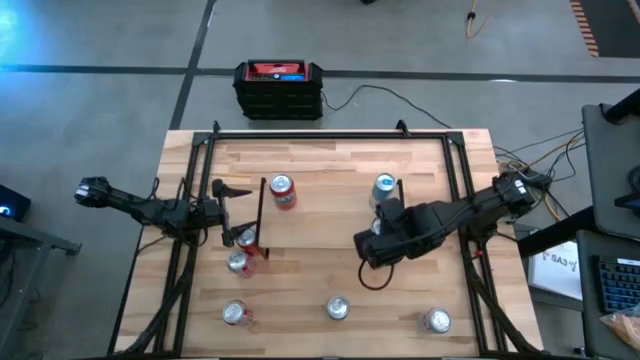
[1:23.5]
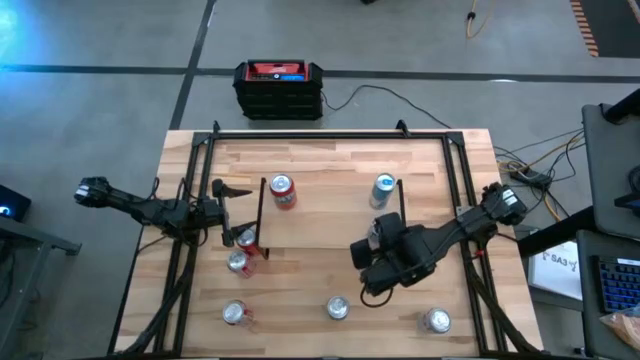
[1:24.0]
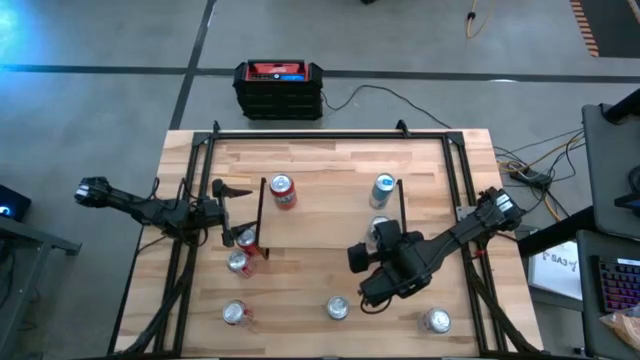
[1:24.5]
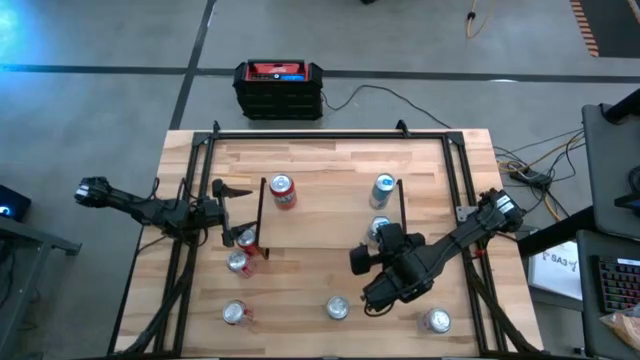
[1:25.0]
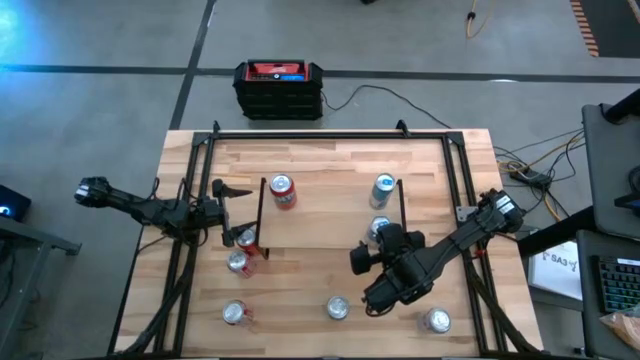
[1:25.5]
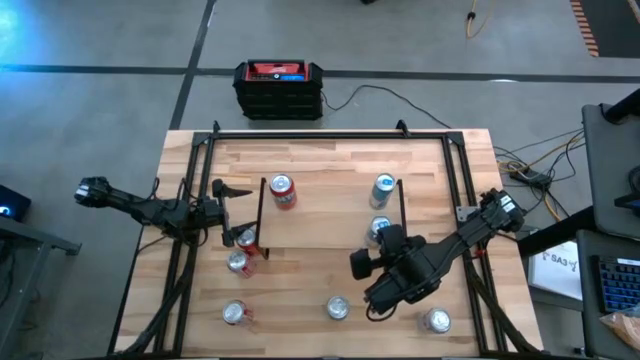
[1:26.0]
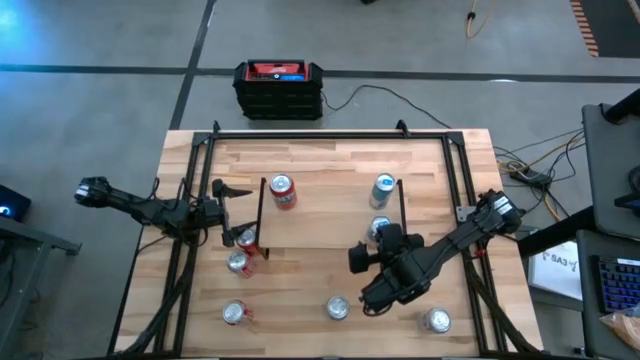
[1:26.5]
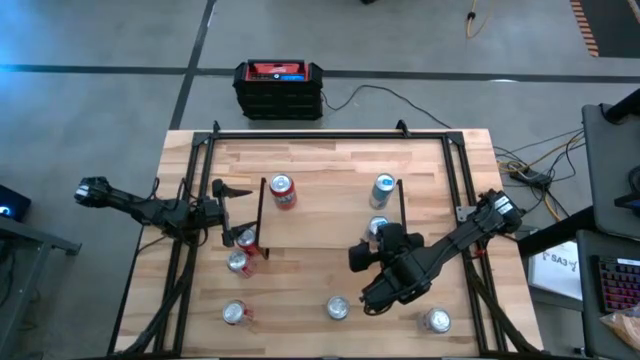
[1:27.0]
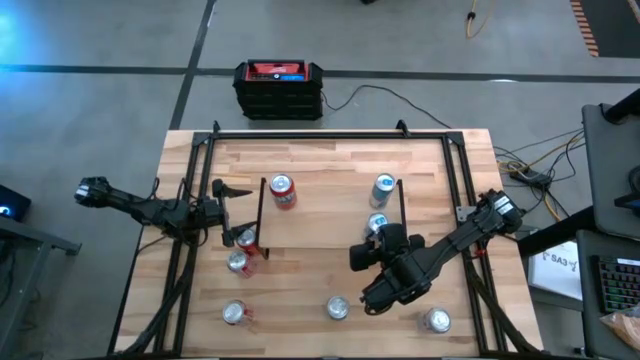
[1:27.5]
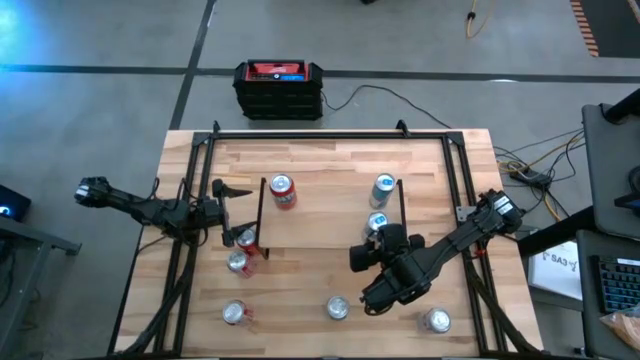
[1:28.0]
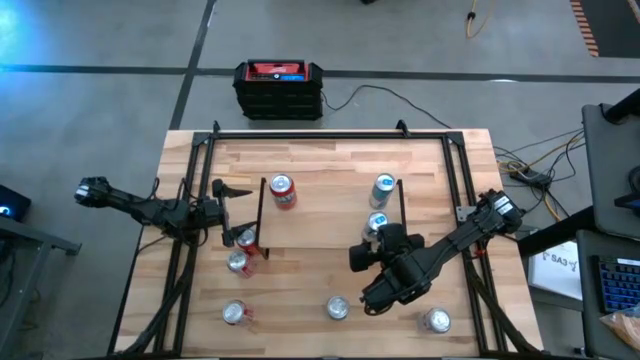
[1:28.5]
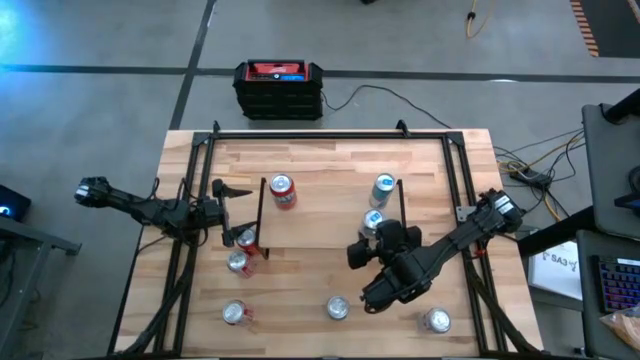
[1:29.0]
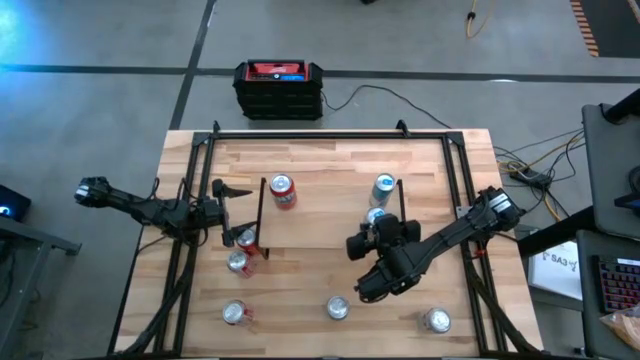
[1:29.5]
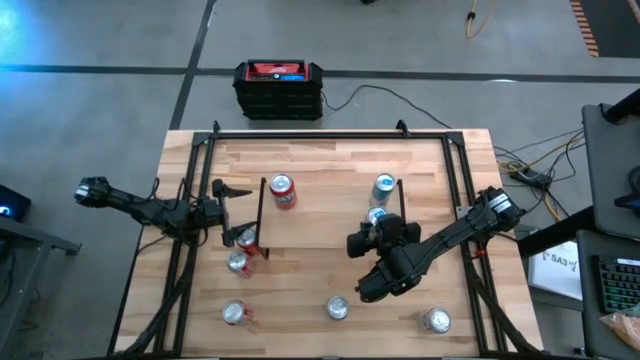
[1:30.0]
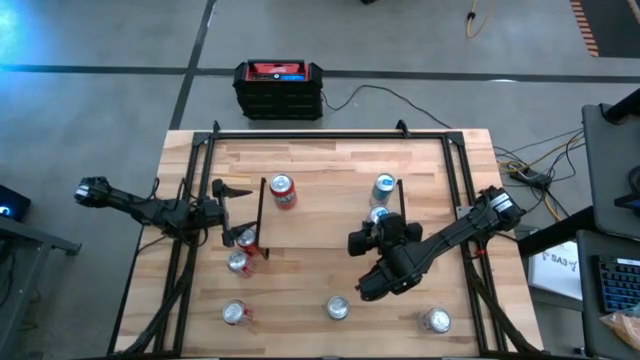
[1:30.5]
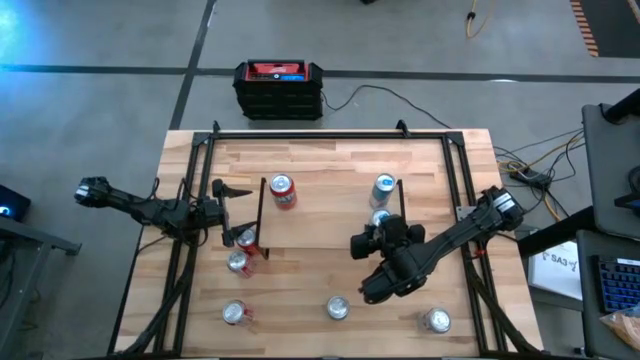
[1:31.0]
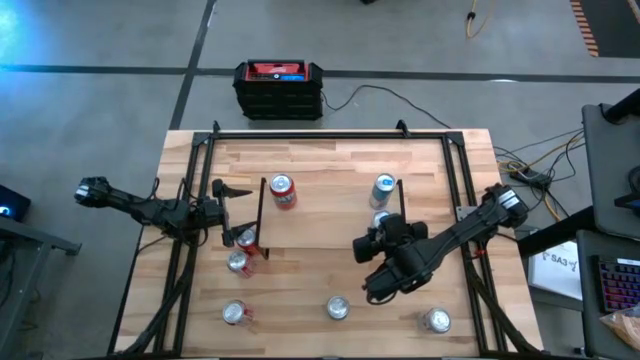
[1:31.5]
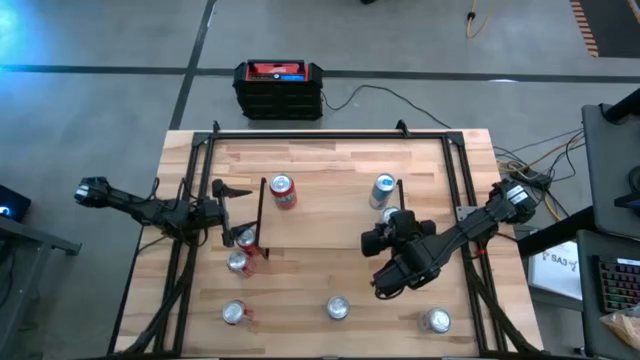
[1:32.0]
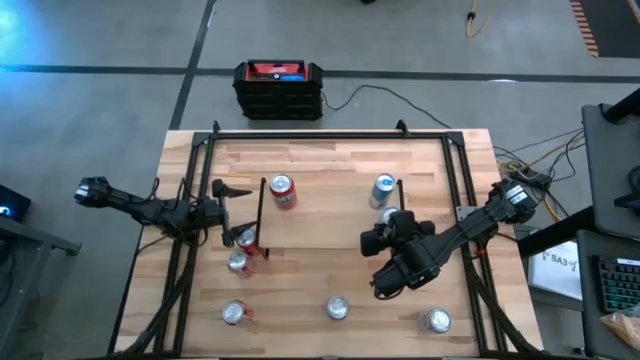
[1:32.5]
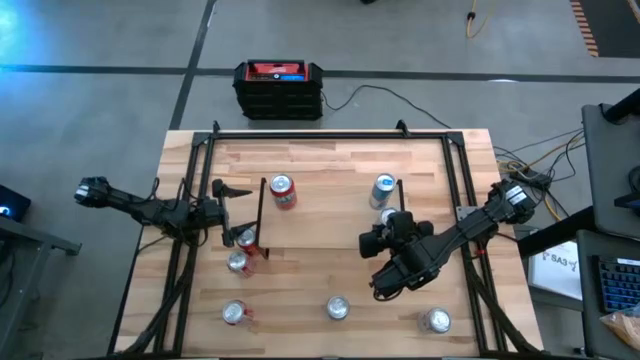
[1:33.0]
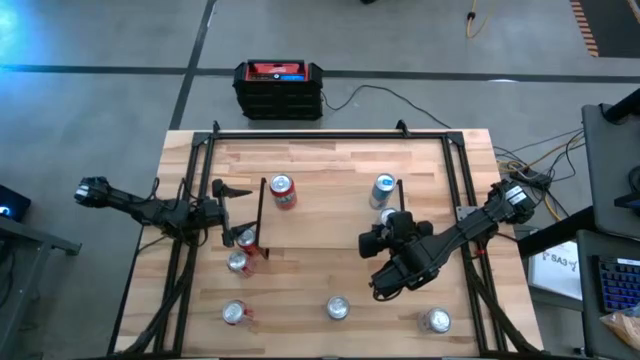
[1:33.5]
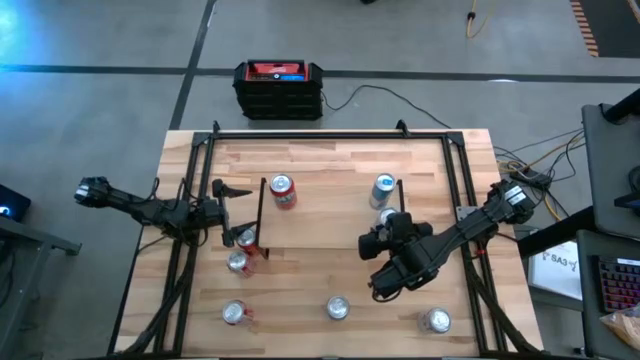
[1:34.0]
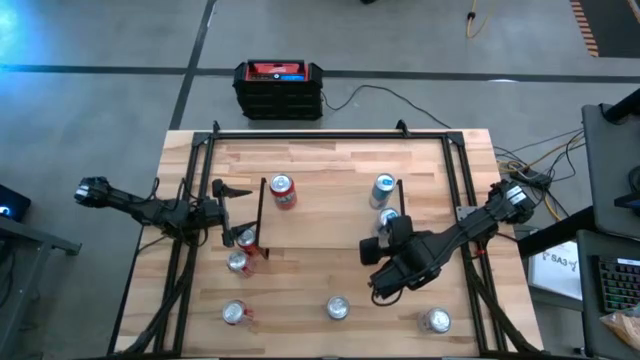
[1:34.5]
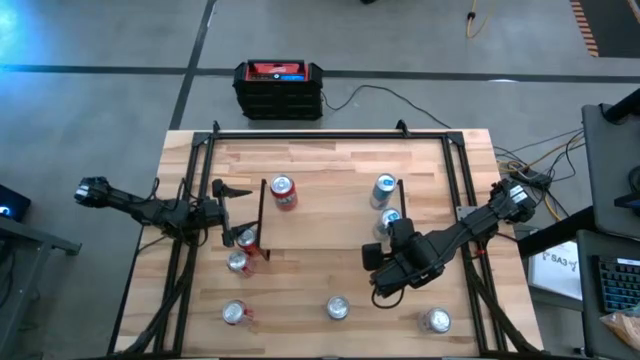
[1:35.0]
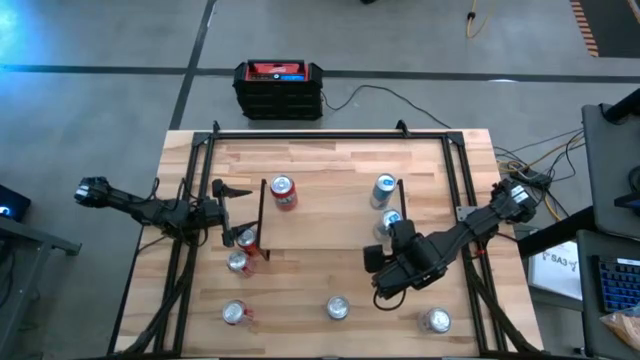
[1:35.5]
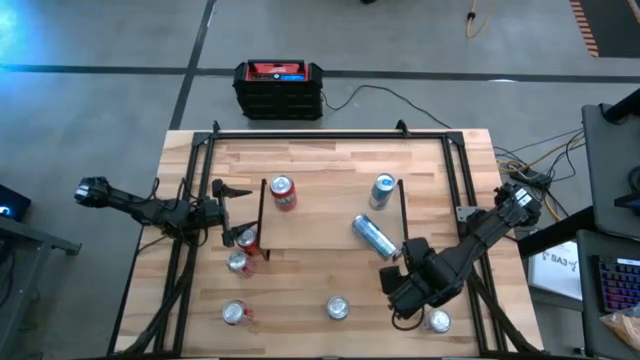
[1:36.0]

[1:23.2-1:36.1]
Task: Place canned beverage on shelf
Put the blue soda can on the shelf aligned with the other blue soda can

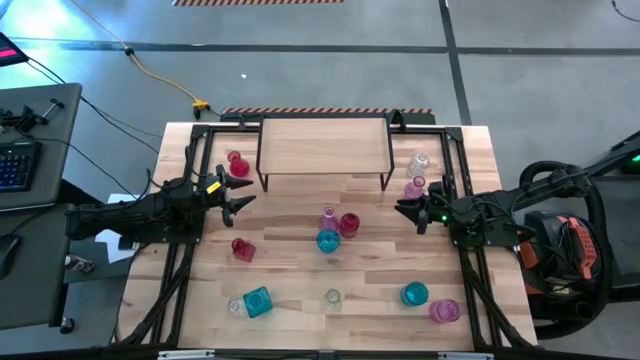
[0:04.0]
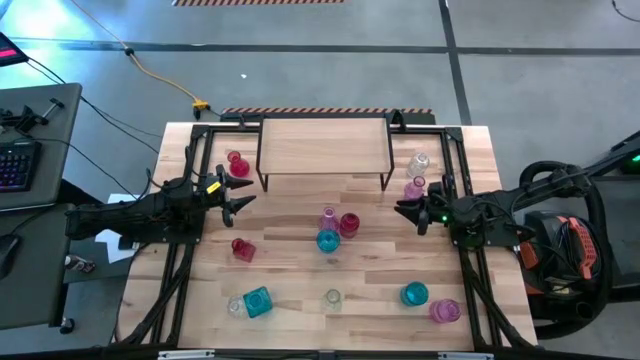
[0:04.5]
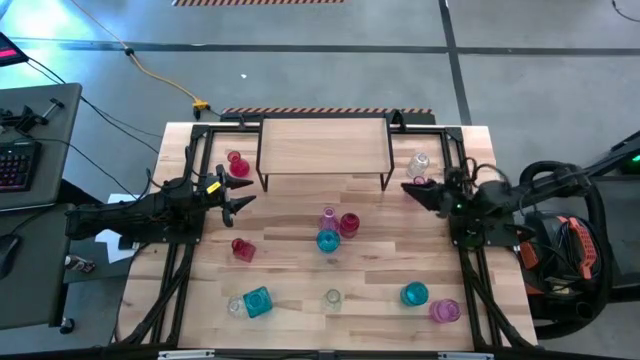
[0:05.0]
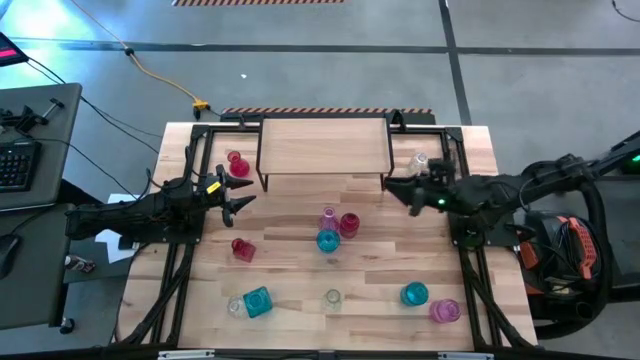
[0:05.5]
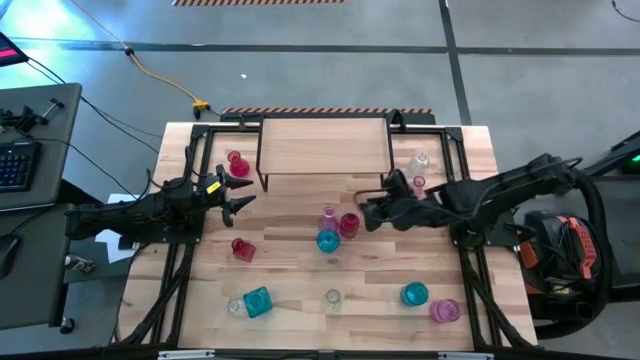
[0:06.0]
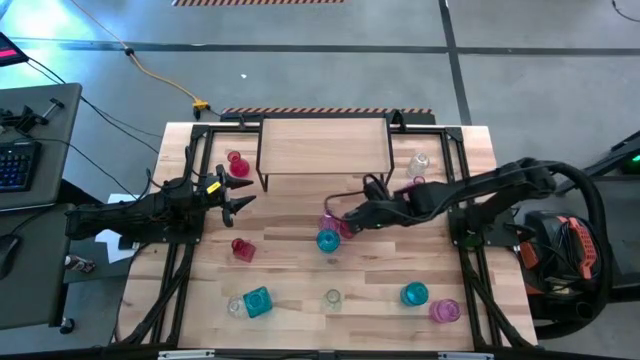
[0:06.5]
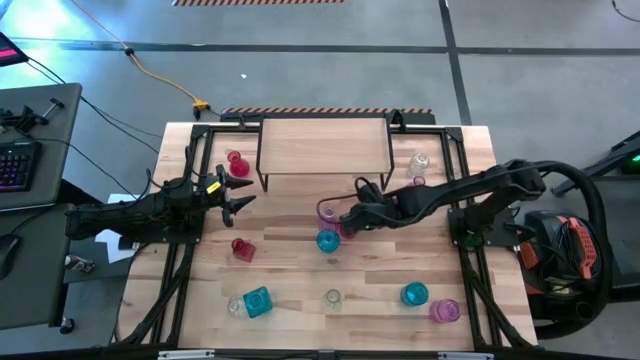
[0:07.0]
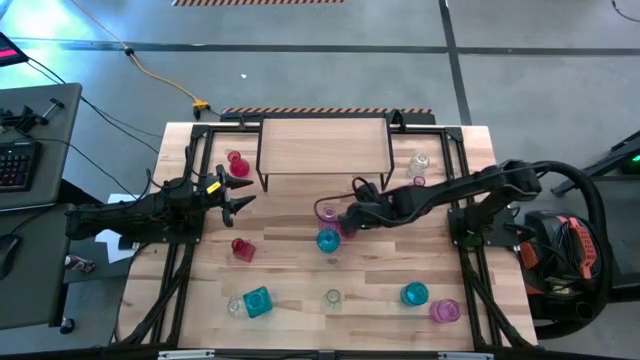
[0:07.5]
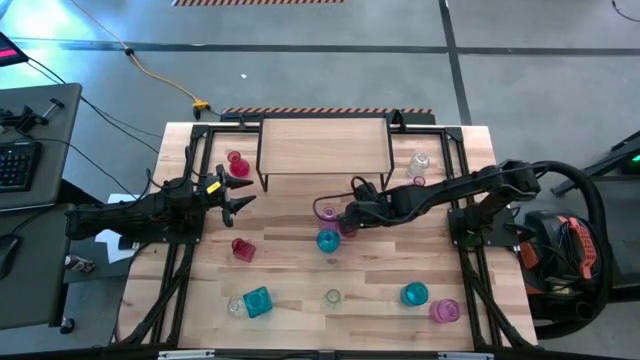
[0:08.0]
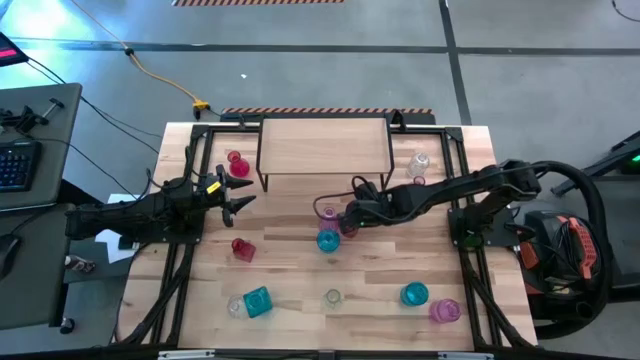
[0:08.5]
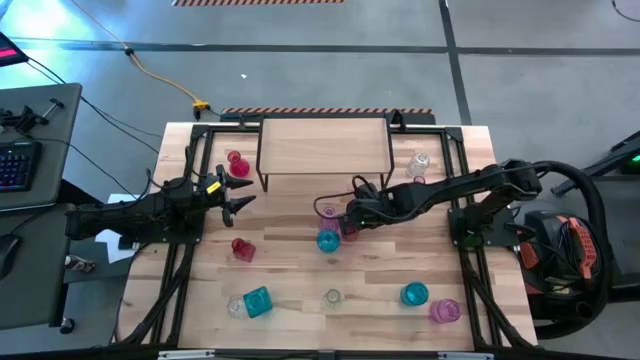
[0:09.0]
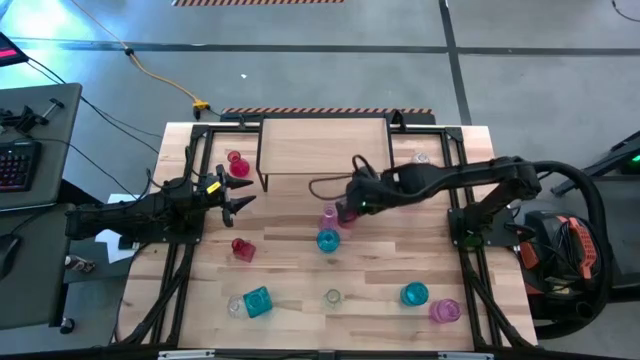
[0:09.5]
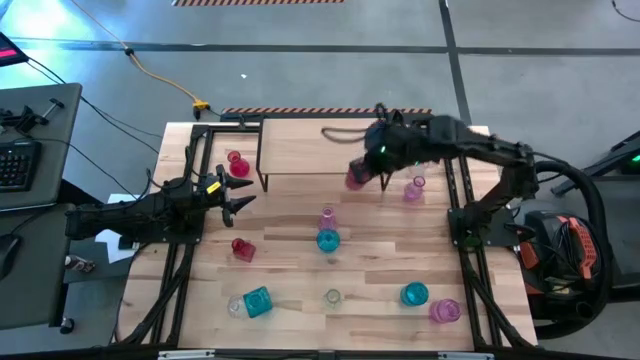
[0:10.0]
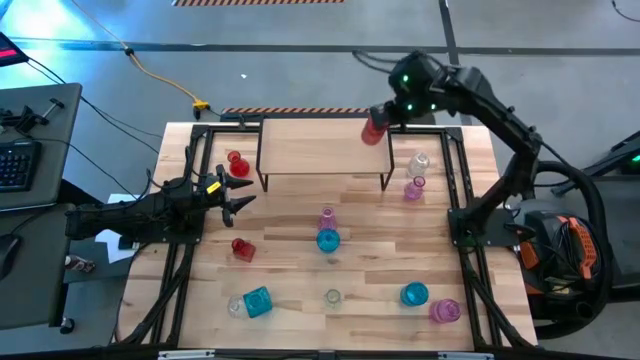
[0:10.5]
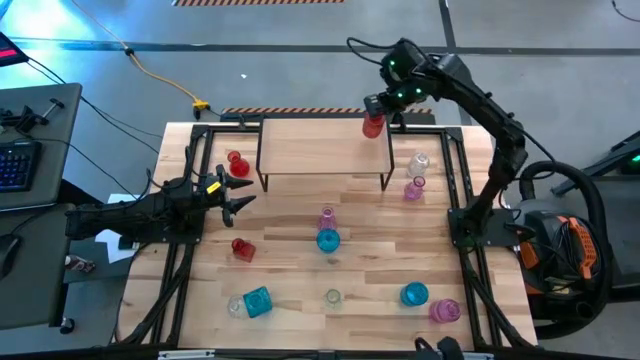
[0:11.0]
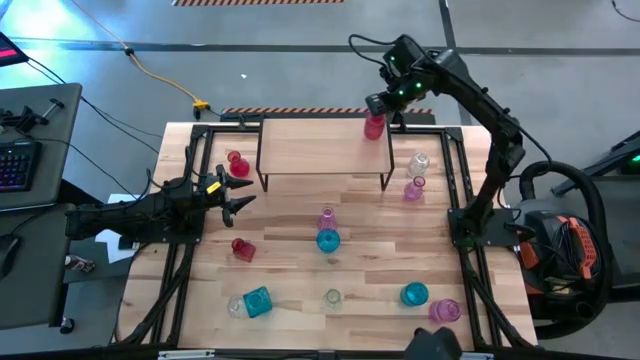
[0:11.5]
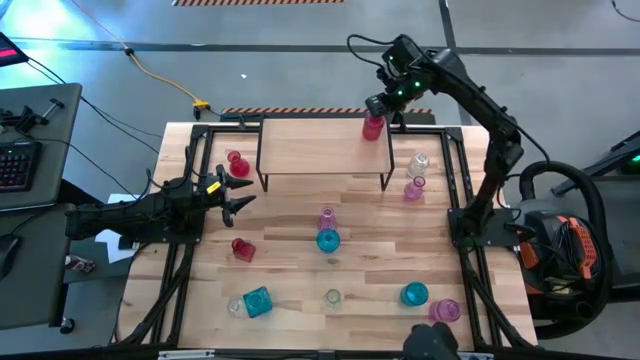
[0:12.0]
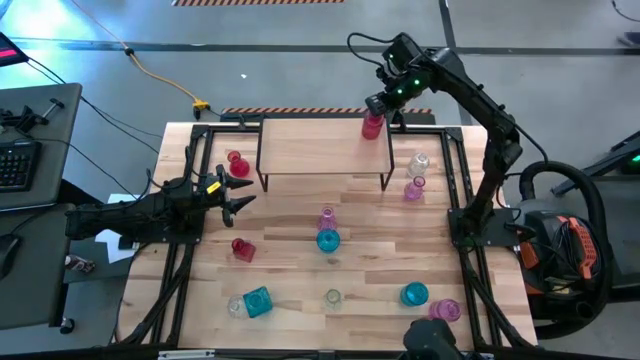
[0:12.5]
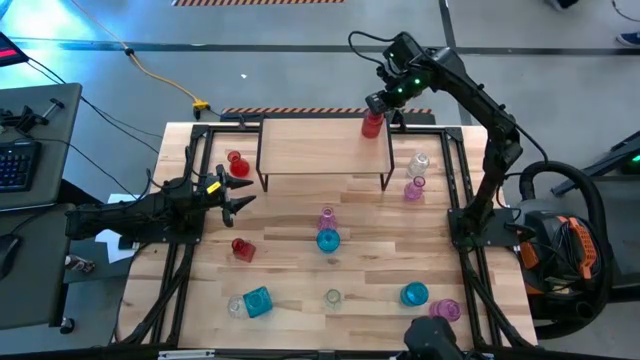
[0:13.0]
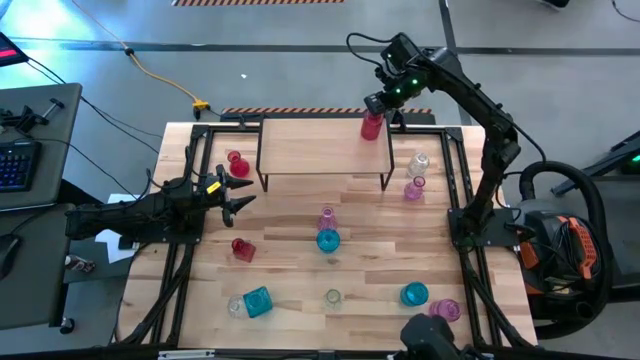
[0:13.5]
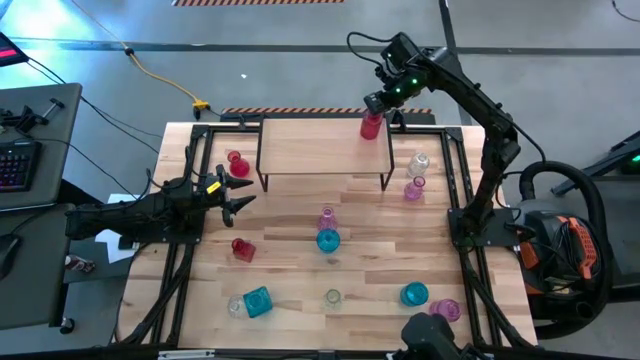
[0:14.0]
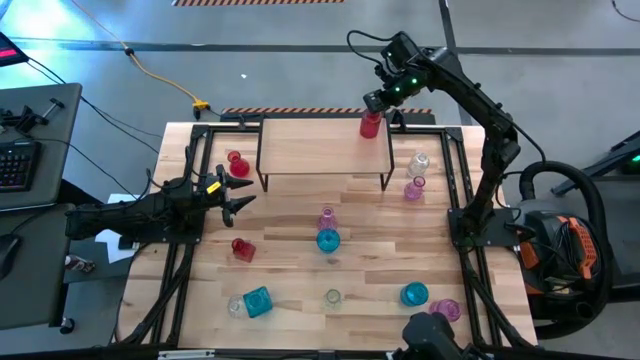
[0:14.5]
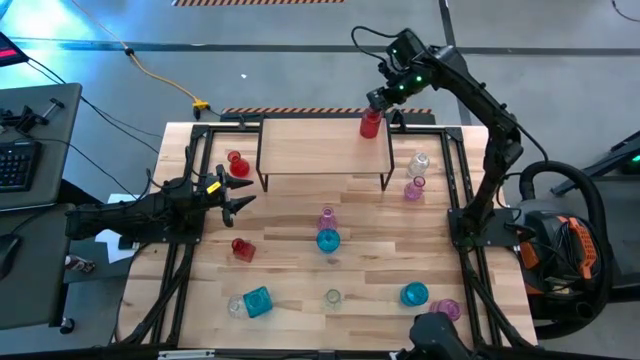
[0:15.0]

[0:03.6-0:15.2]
Task: sort vases onto shelf
Put the middle right red flower vase on the shelf
